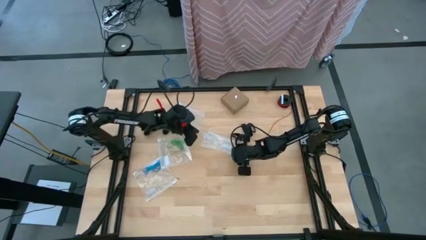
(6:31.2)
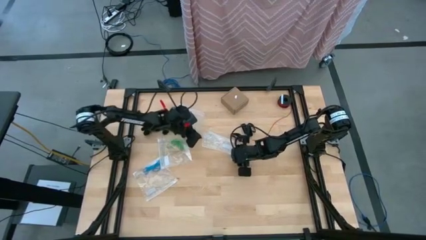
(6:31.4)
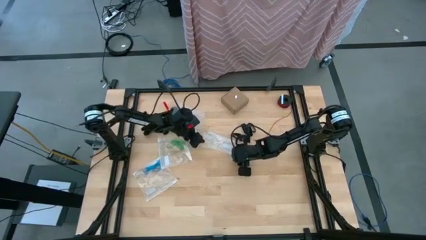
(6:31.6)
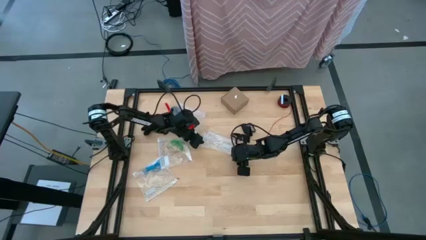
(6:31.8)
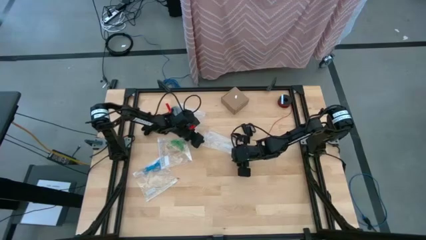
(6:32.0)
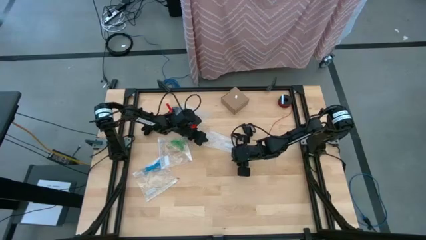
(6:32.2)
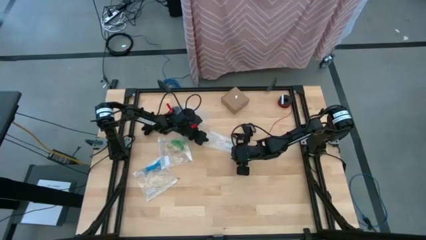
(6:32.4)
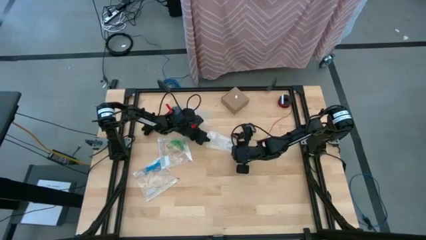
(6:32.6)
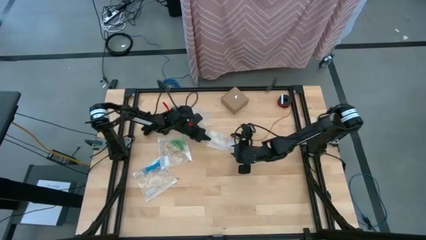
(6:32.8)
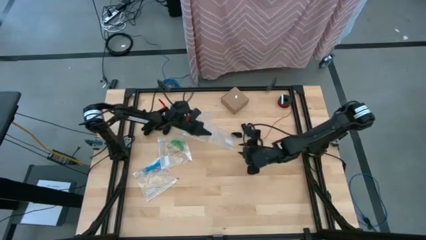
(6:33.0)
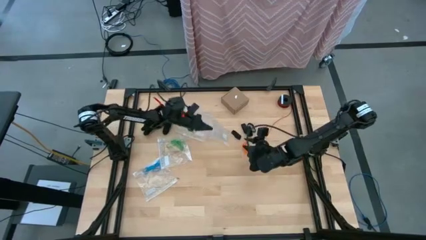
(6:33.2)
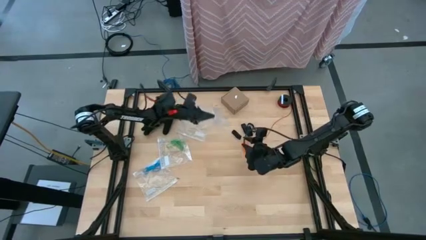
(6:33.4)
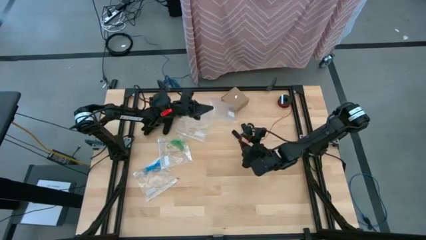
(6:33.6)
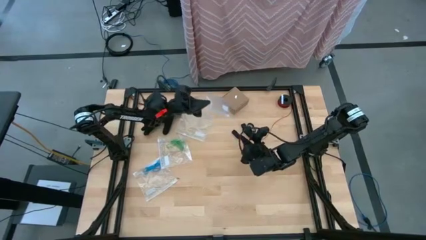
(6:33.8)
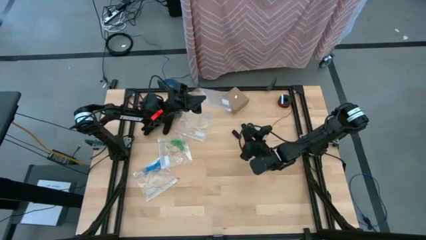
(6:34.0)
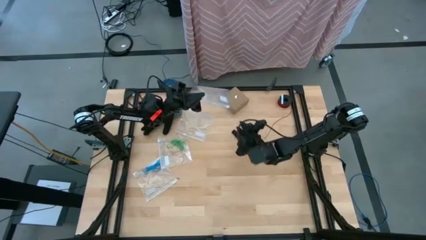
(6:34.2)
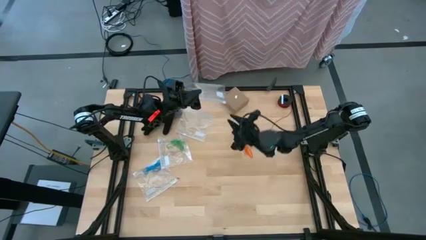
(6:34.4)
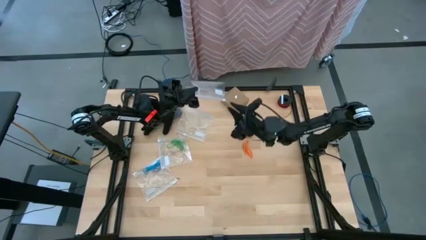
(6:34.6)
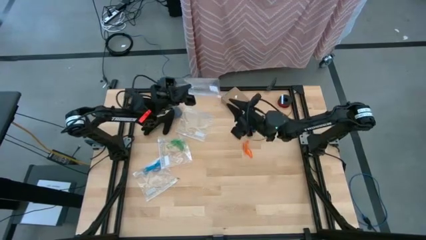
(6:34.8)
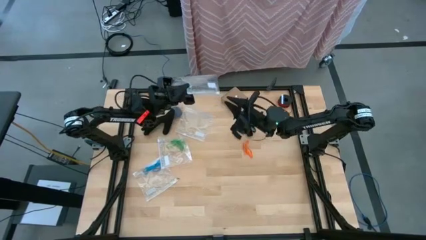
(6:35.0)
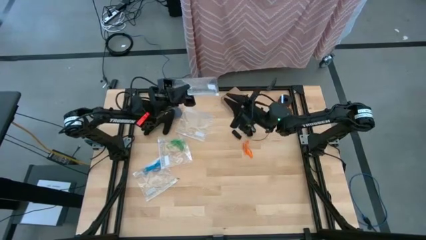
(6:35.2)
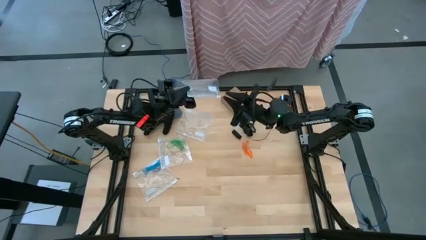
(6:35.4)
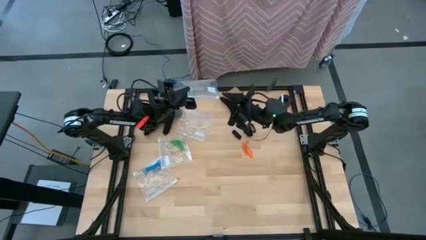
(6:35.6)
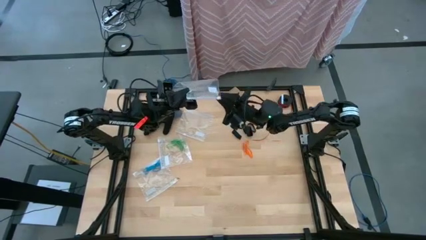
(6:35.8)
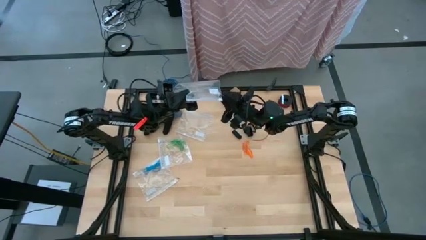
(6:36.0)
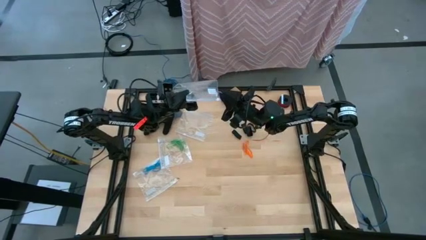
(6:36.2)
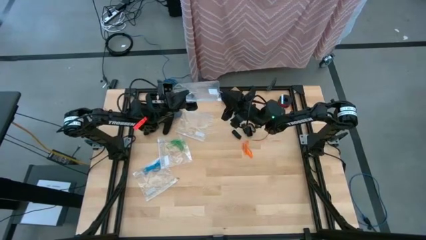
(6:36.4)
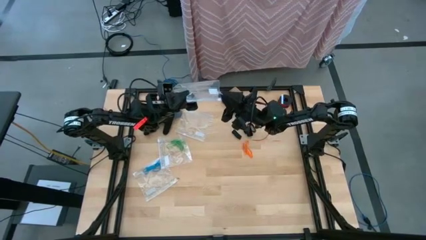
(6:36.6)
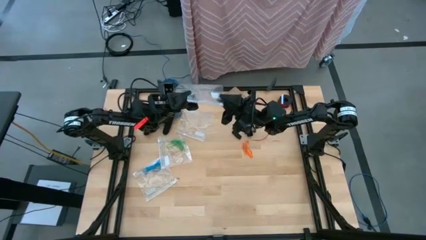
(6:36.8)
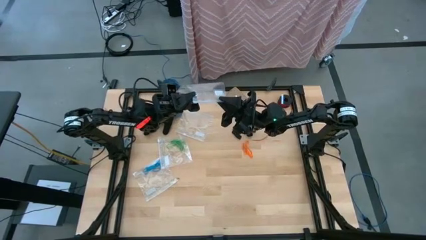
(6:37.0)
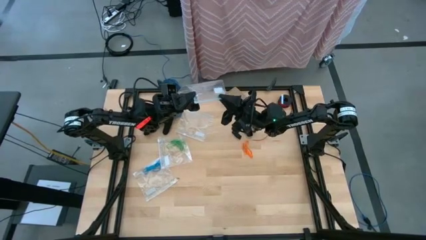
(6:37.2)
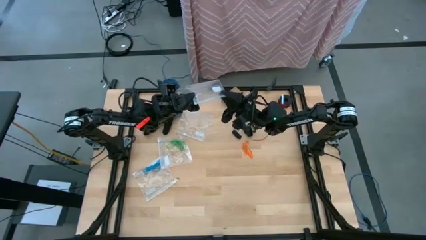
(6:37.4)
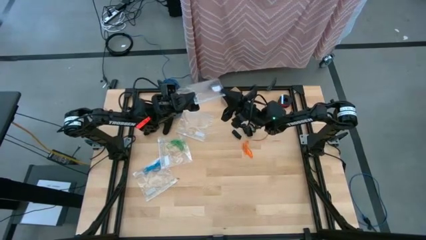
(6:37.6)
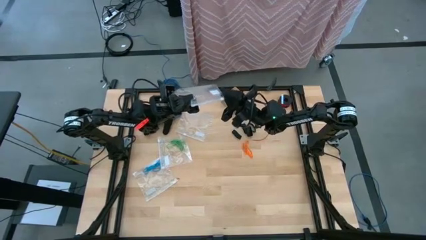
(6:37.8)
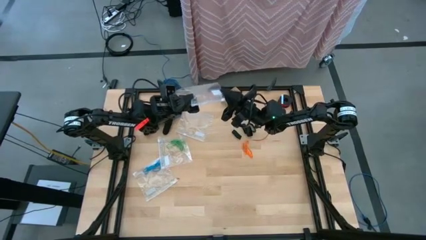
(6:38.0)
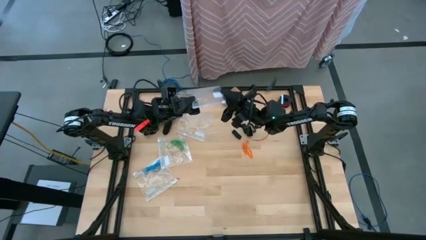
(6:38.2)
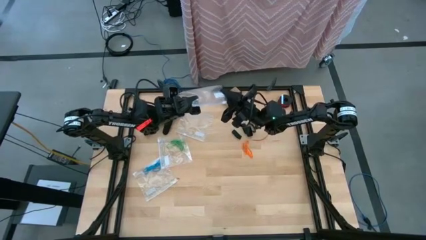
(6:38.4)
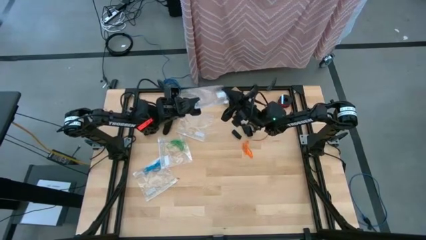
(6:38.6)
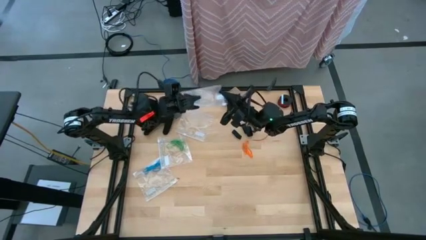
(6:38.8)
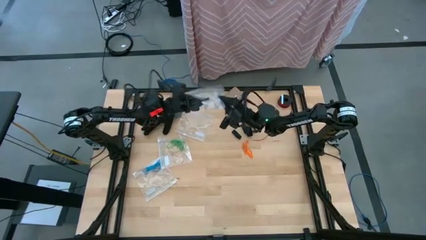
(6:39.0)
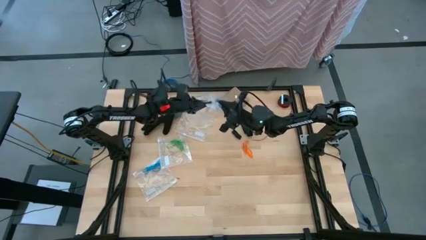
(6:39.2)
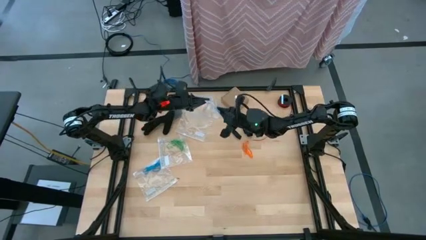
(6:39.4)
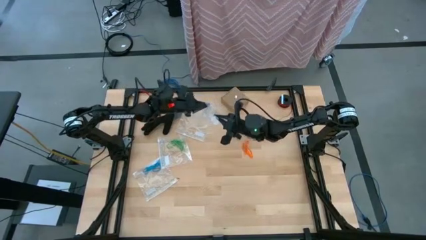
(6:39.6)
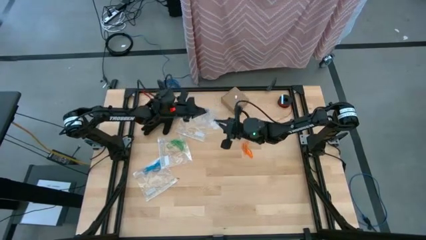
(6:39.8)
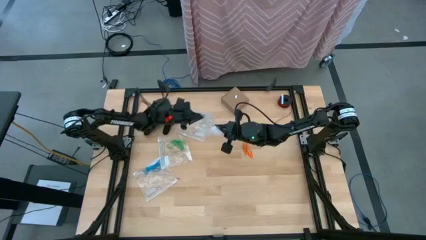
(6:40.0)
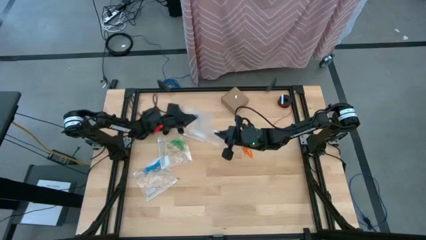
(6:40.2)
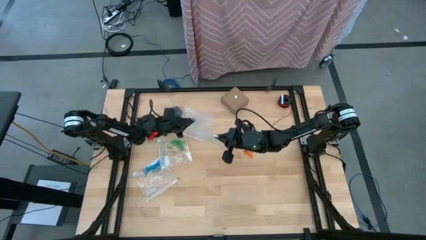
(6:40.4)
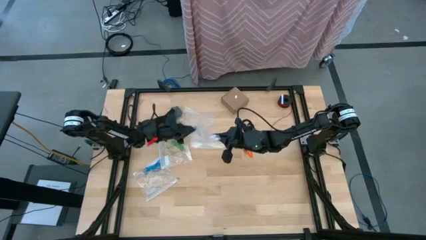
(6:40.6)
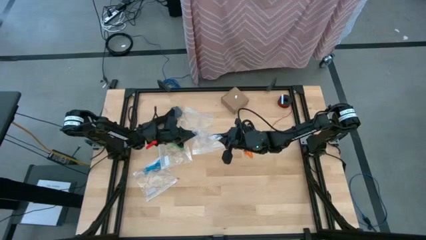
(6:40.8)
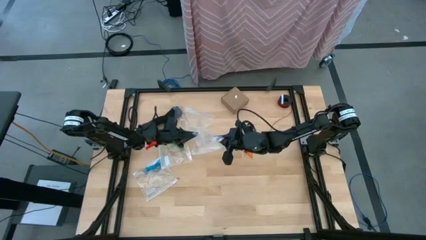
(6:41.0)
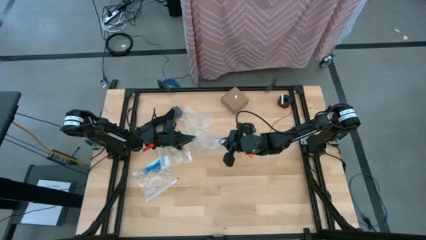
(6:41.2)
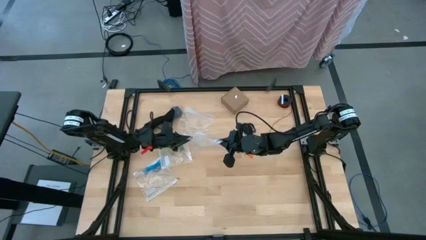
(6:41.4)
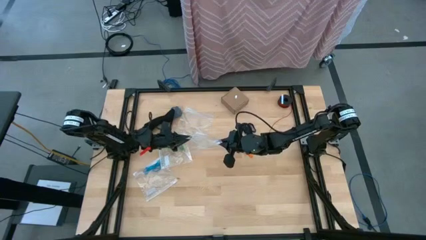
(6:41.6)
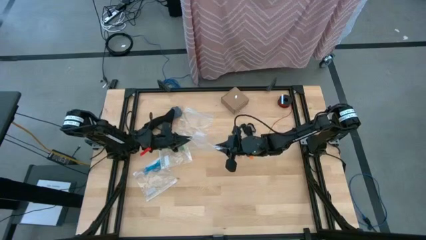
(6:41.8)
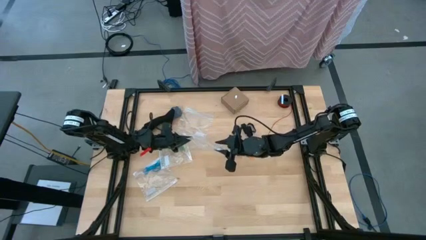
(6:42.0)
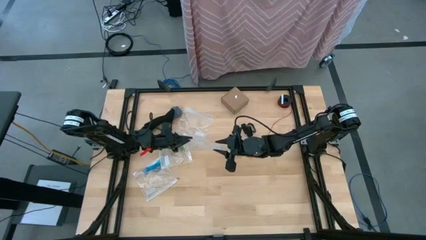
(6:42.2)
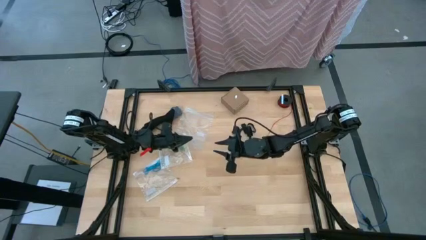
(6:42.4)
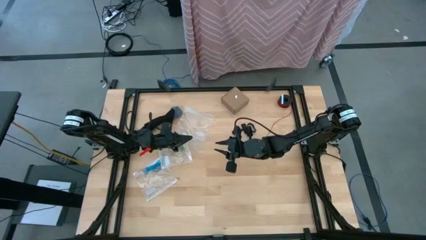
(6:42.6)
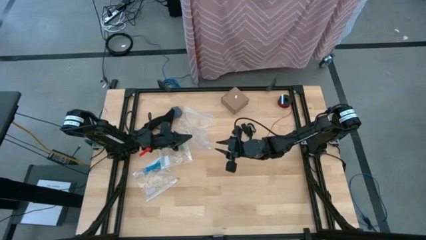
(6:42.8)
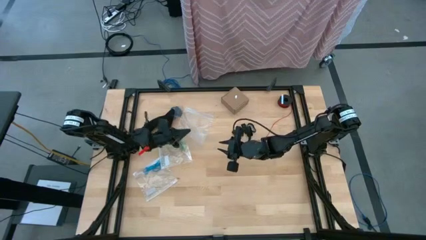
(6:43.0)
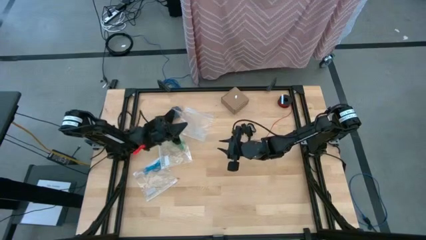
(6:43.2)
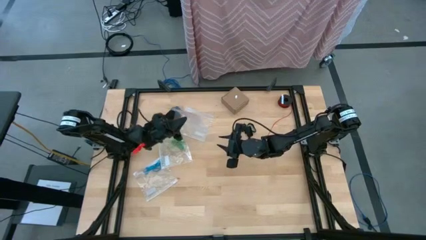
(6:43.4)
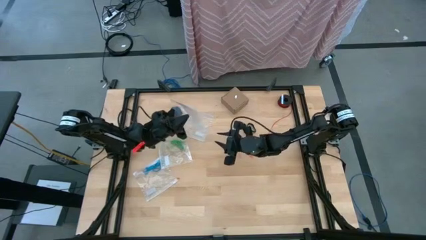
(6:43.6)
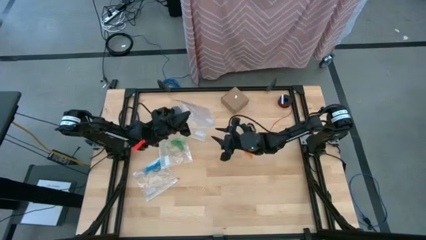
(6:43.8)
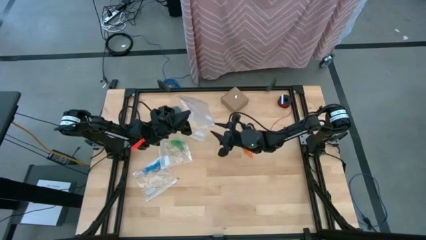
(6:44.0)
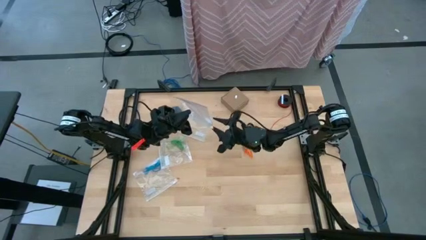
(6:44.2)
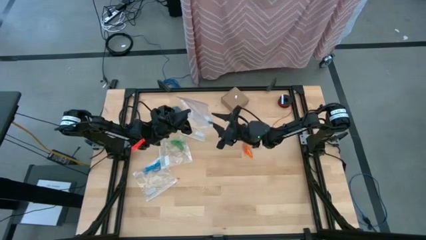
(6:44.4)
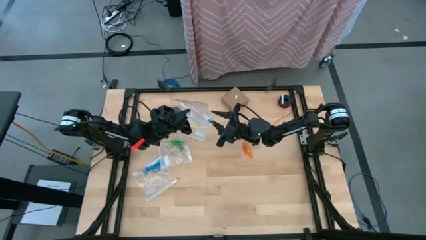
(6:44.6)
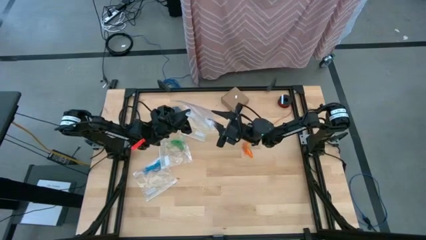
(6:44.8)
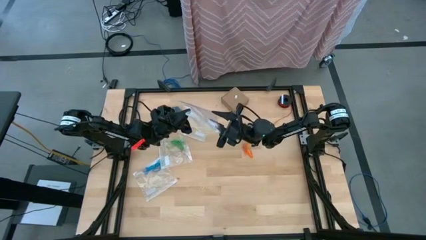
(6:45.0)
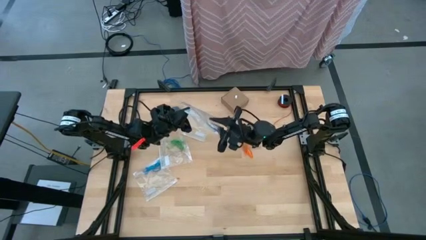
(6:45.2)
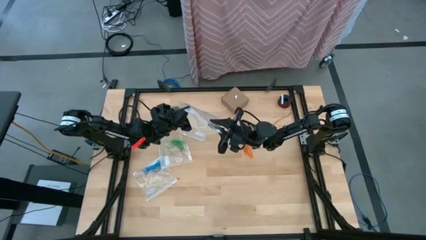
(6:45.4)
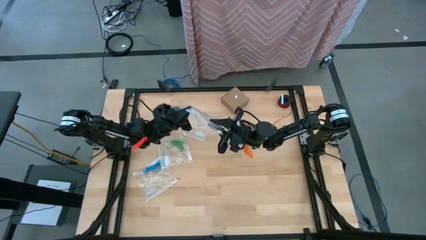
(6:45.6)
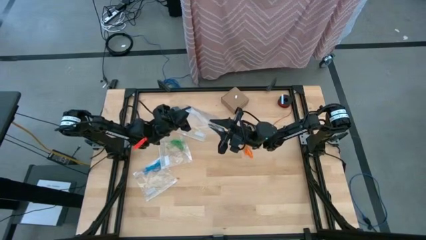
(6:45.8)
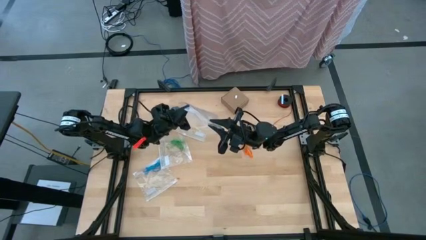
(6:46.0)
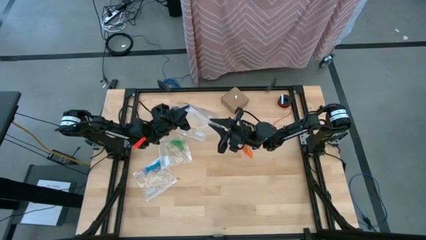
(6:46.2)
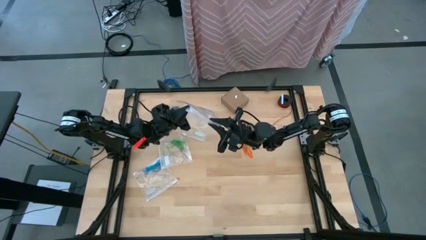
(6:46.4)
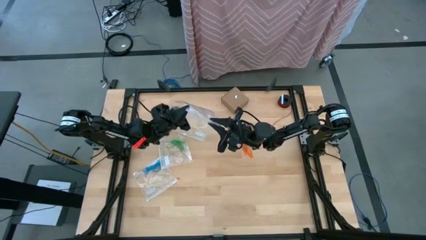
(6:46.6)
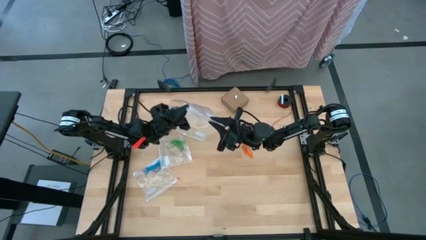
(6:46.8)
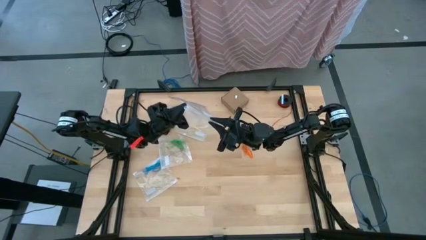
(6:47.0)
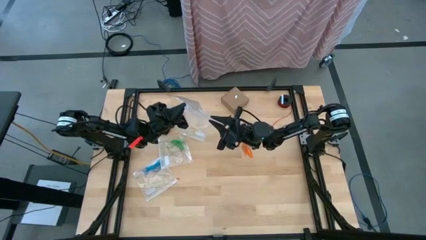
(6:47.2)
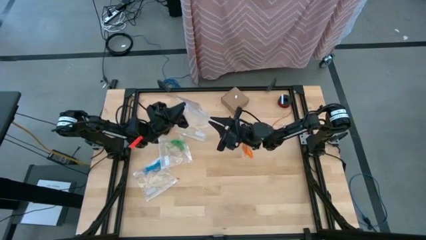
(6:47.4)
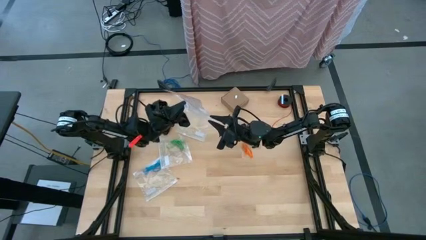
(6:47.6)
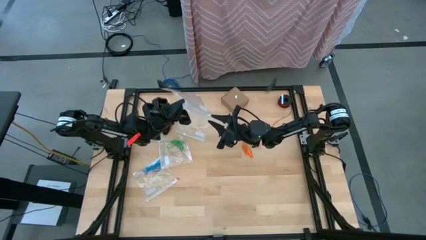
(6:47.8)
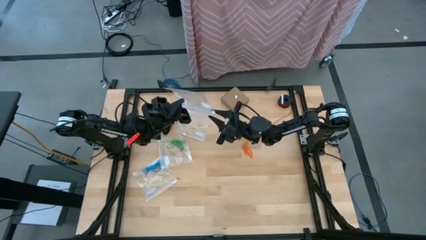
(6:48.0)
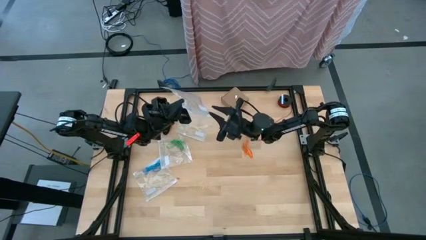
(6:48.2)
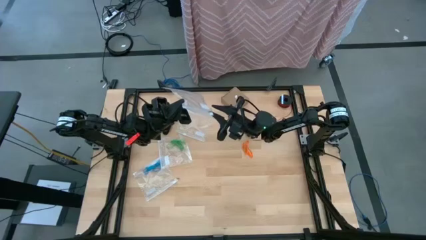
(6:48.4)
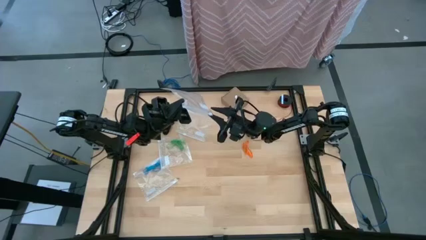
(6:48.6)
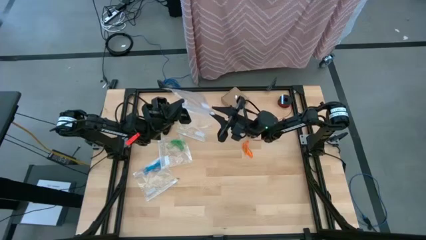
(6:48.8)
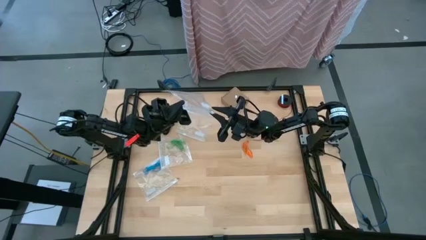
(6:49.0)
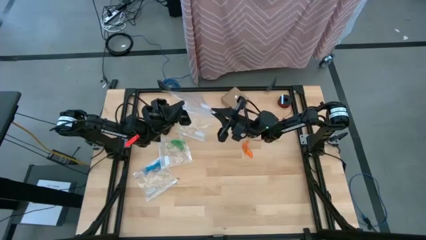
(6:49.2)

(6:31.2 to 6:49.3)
Task: Sort rubber bands
Open the transparent zip bag
